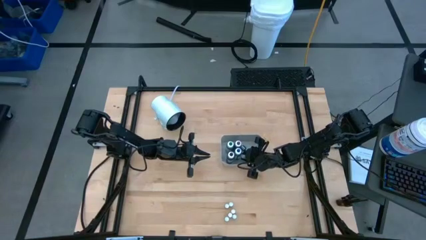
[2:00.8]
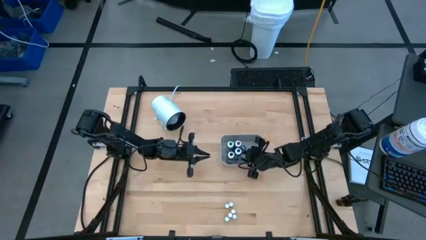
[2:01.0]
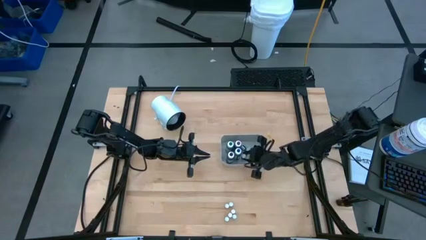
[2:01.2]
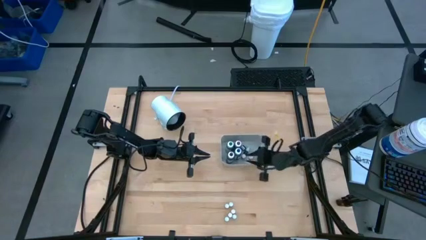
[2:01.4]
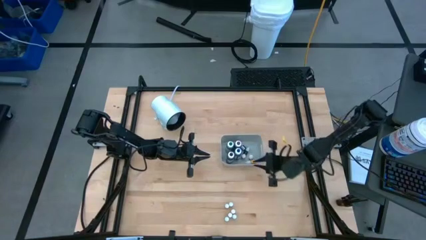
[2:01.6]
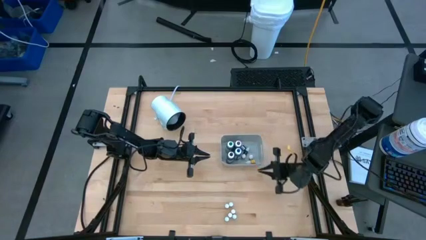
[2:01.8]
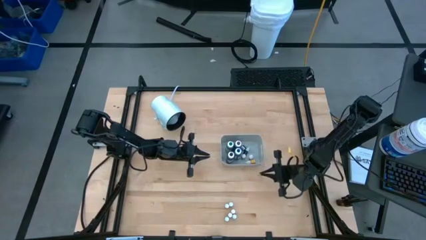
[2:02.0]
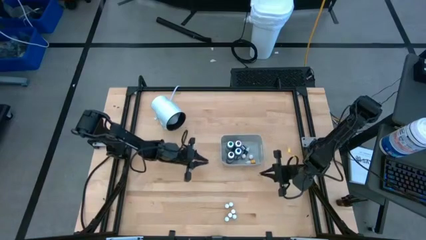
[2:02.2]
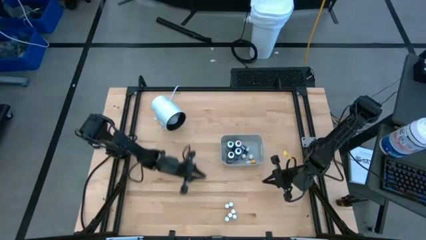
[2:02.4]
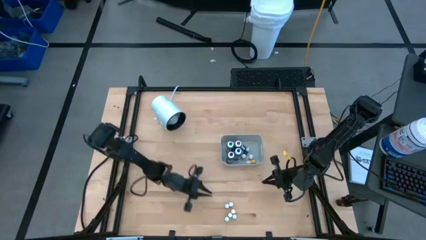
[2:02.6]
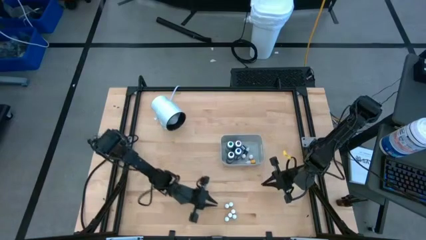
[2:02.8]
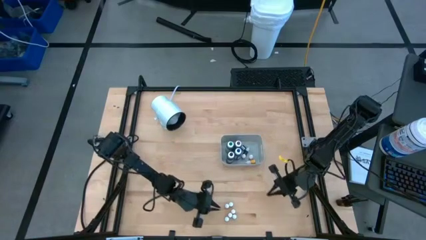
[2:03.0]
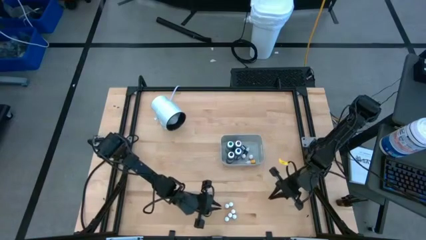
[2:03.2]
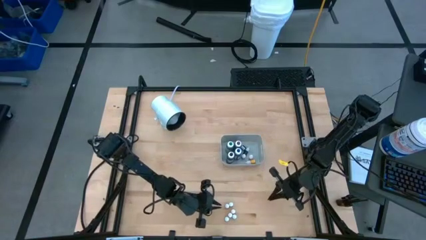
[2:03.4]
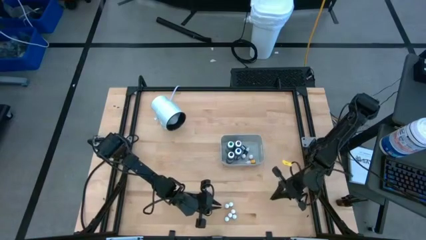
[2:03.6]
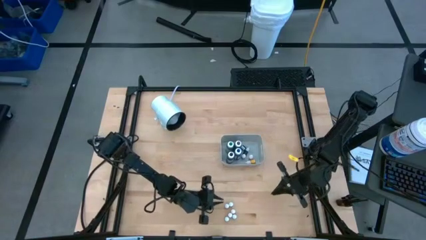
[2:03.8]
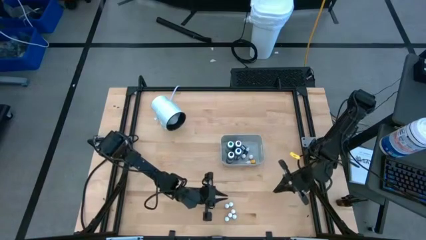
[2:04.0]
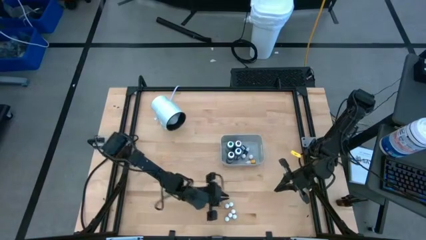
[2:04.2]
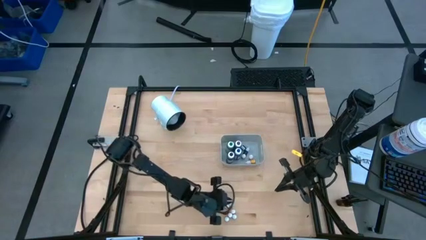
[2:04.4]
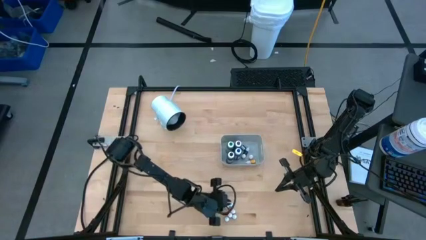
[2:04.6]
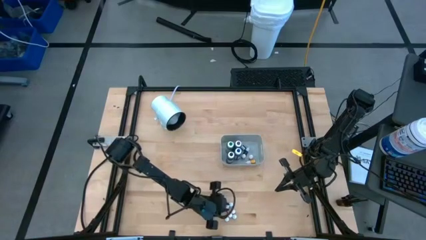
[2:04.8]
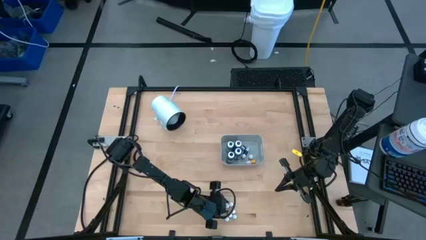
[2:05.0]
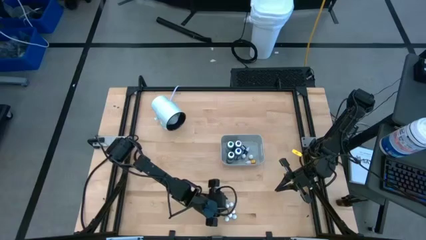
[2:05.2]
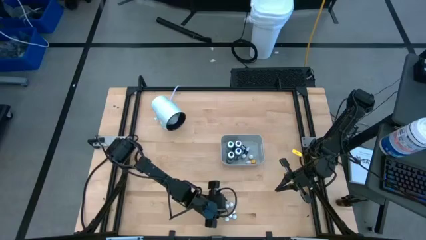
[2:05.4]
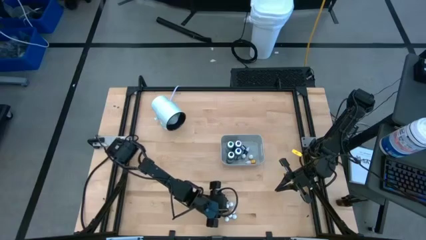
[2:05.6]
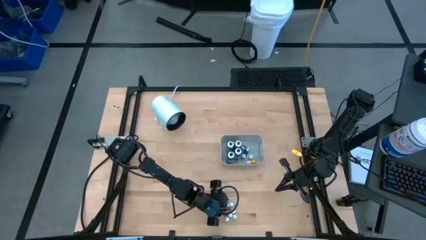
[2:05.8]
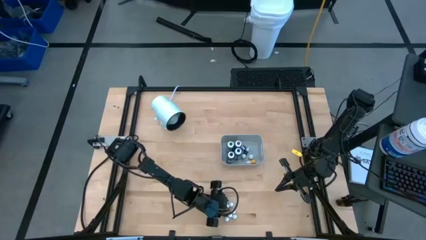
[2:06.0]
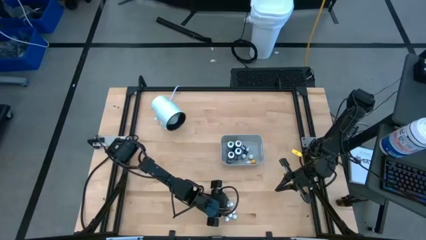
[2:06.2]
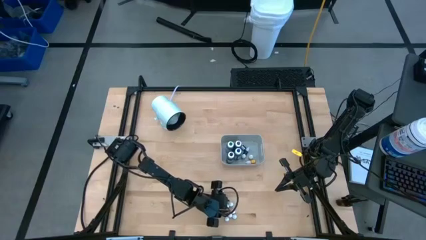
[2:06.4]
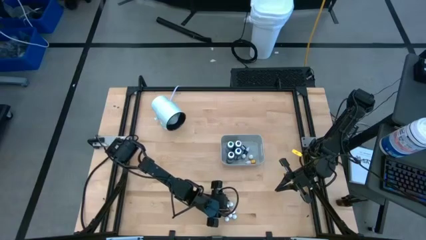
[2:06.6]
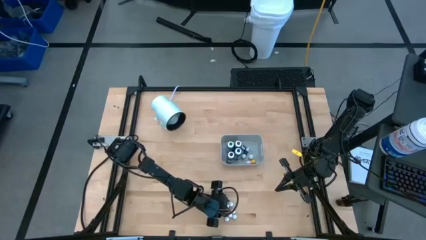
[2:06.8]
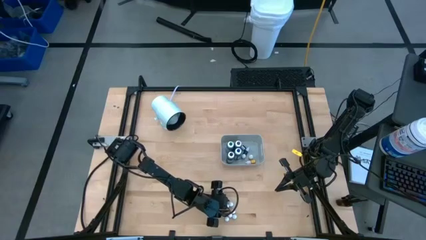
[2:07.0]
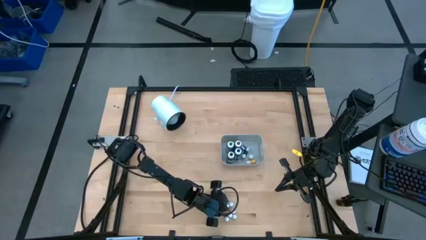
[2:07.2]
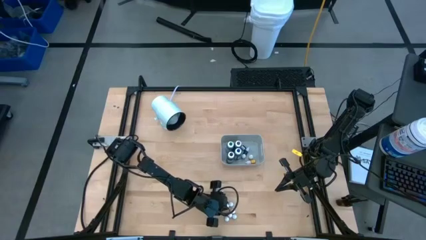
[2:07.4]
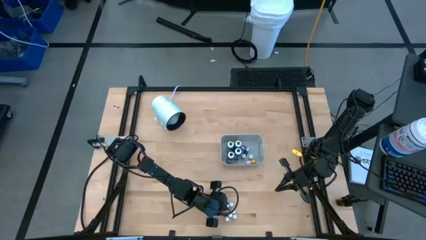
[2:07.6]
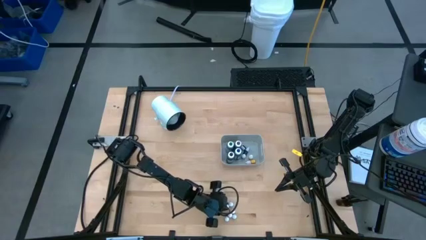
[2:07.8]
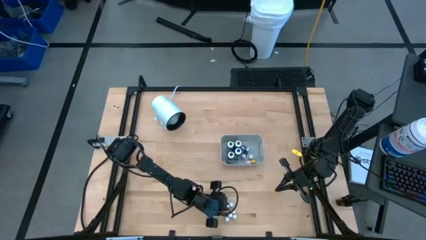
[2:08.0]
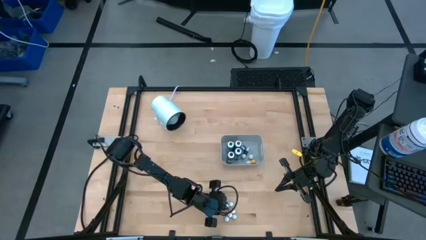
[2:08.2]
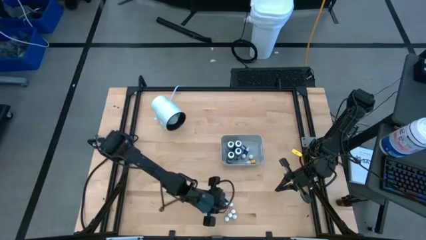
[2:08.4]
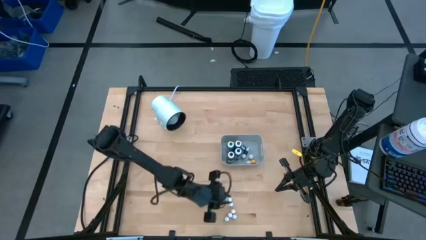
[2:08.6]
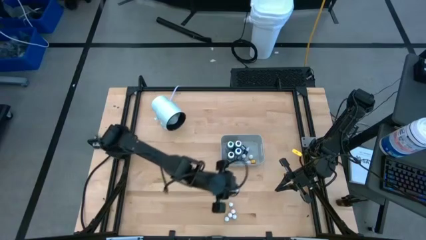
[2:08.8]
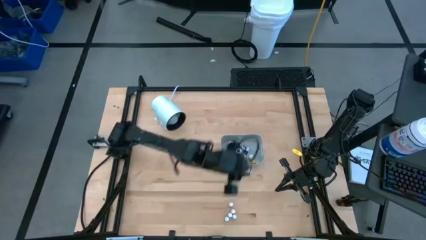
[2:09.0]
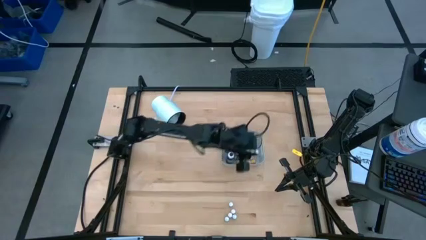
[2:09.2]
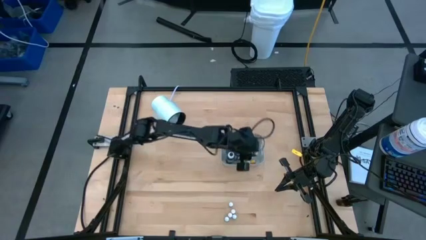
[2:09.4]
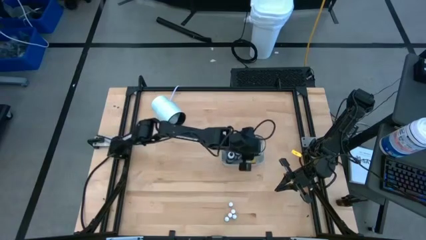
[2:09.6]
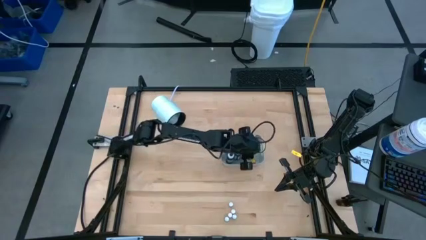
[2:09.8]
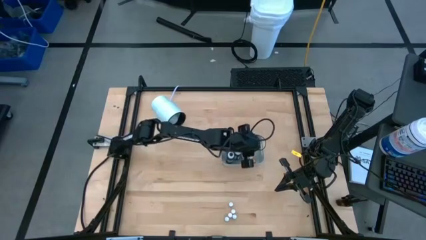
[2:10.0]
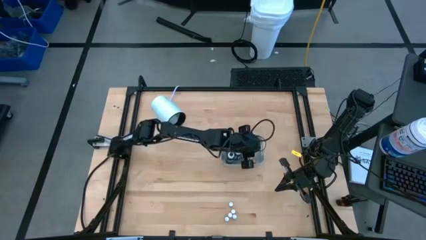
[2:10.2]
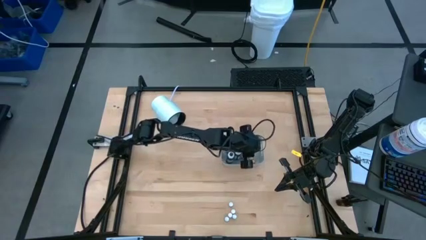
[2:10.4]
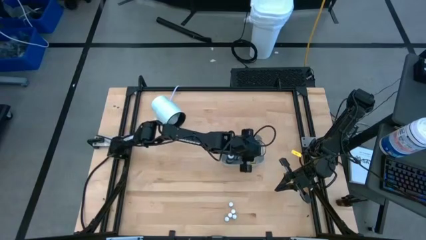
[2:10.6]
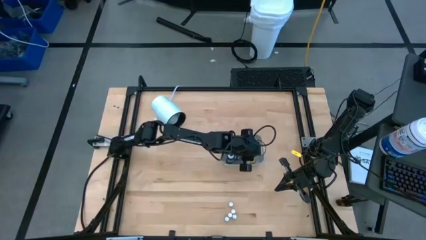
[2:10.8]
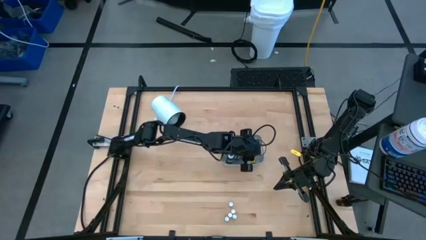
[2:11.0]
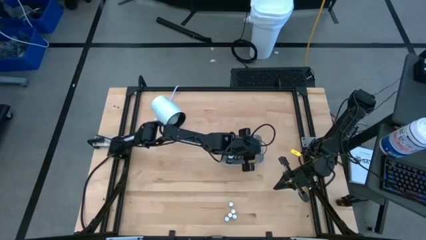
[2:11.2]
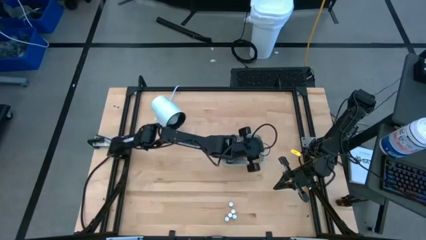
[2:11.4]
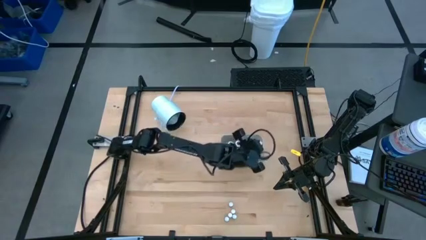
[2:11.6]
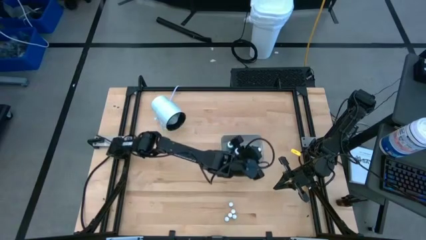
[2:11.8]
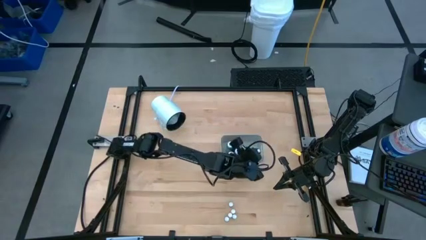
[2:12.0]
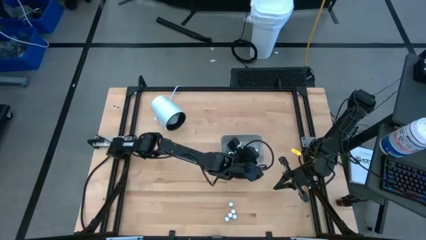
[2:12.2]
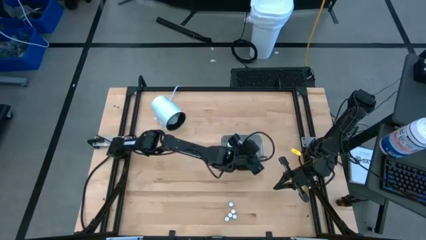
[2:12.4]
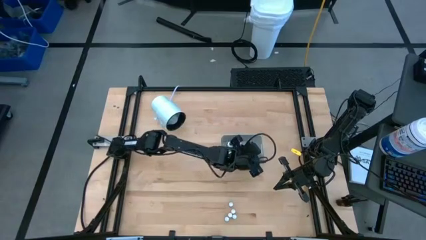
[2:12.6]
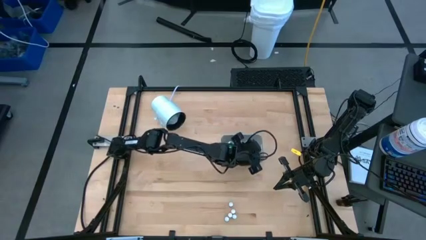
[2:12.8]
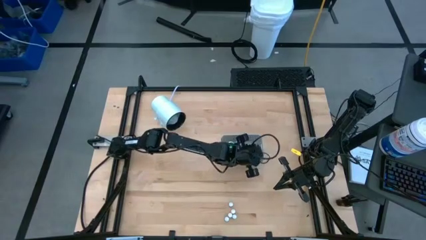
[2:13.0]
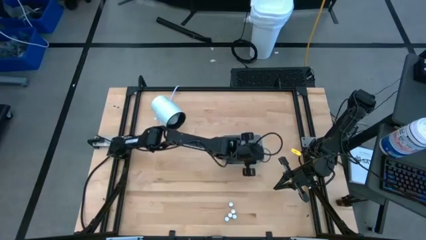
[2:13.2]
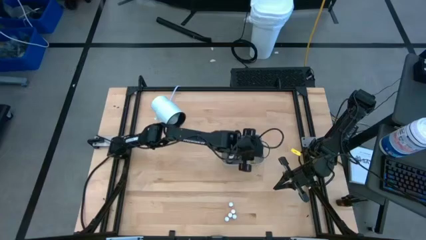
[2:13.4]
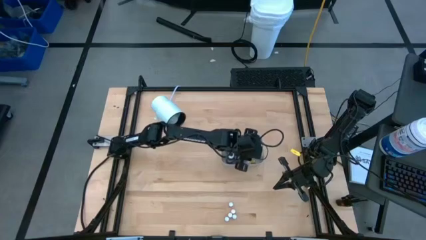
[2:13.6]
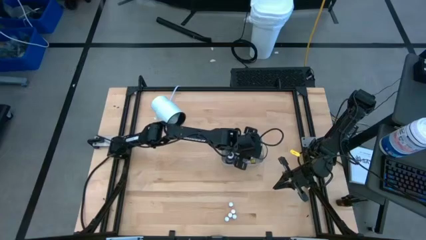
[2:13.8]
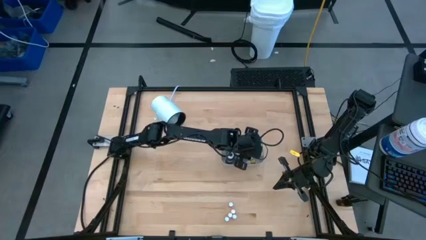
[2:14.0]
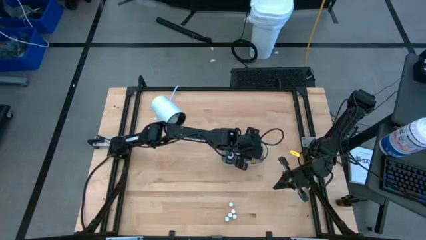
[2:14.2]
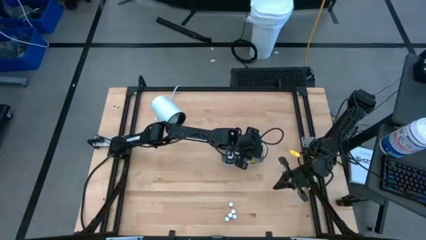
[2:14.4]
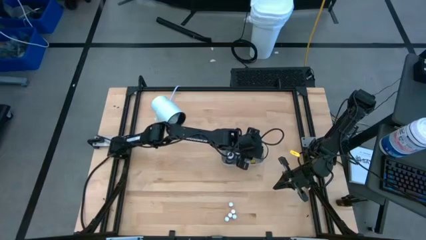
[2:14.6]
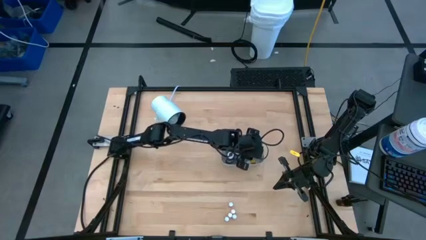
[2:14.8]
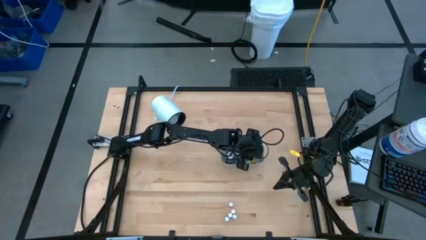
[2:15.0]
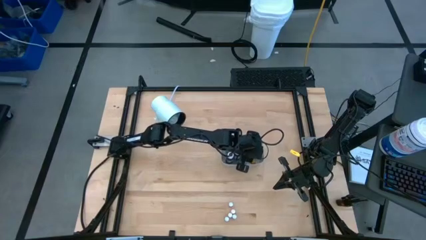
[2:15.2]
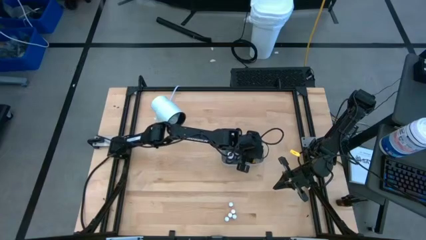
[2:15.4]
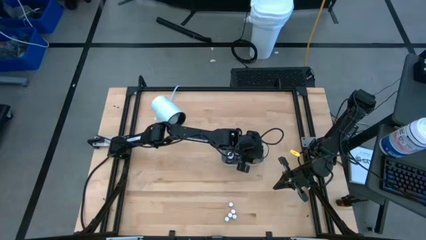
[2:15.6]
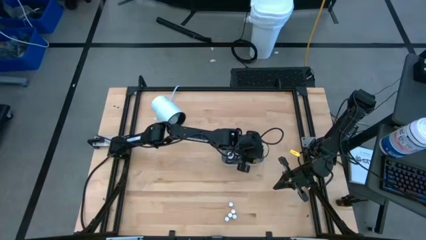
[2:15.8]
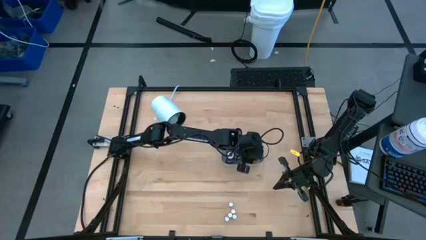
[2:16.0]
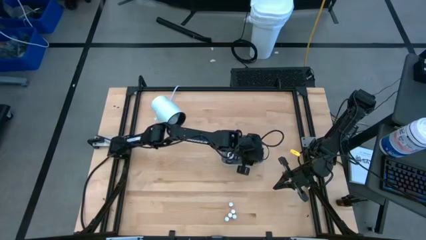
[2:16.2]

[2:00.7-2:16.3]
Task: Pick & Place food coloring
Put the small red food coloring bottle into the gray bin

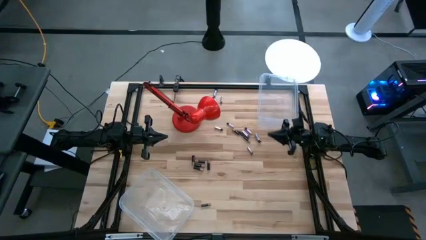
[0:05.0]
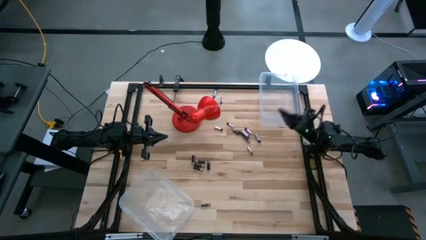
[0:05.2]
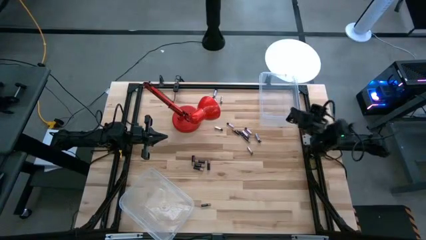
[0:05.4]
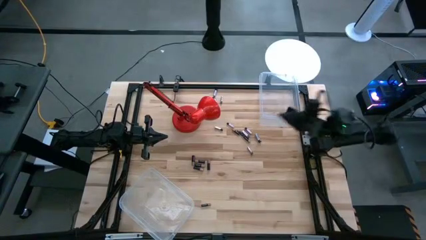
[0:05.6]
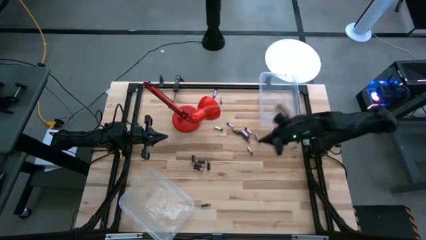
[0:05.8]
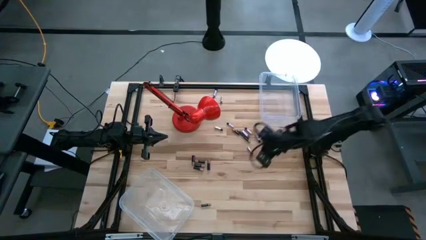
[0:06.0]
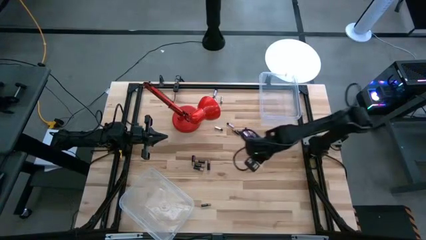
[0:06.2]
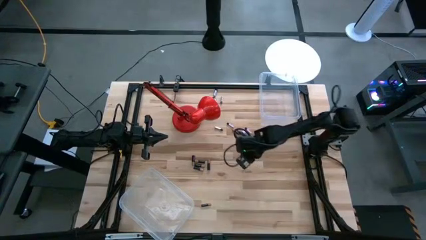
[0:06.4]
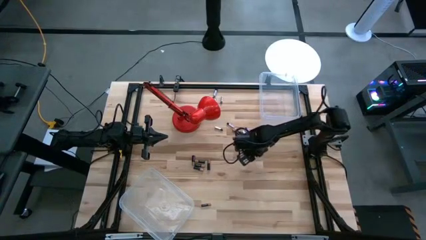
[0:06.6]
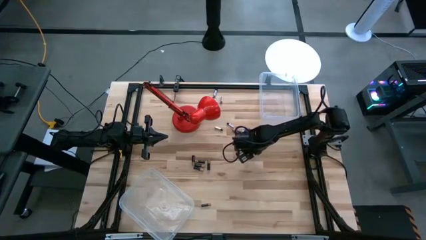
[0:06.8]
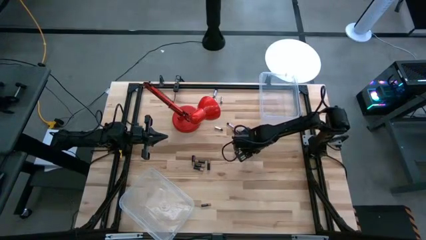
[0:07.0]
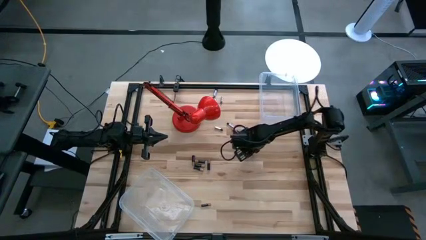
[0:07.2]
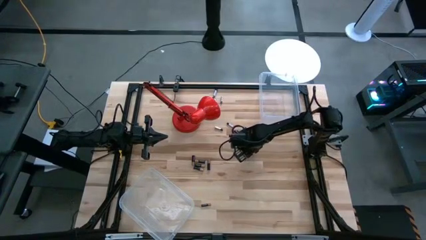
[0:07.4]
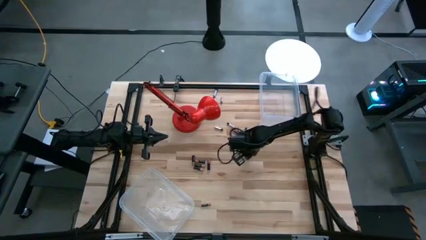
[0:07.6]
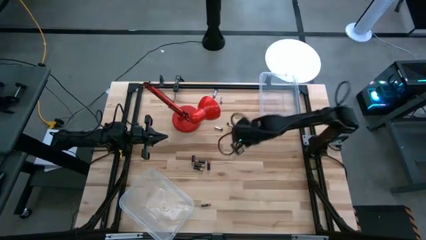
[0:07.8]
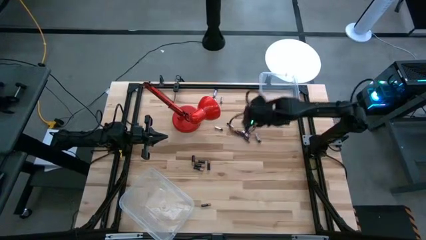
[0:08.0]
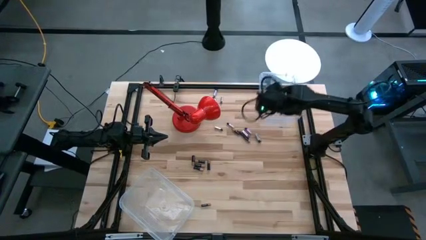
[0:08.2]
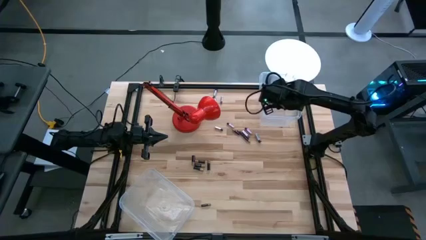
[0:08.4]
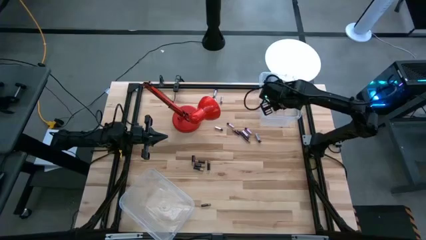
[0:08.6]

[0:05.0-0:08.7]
Task: Sort batteries
Put the silver battery into the top transparent bin
